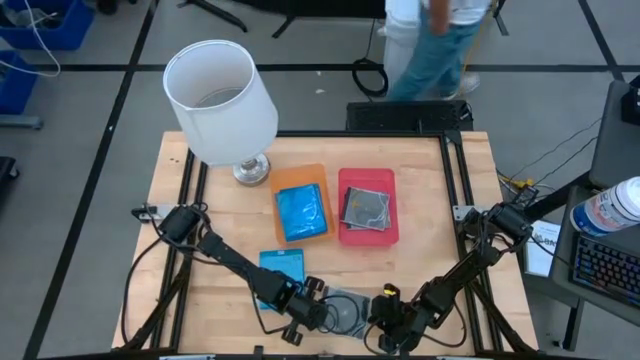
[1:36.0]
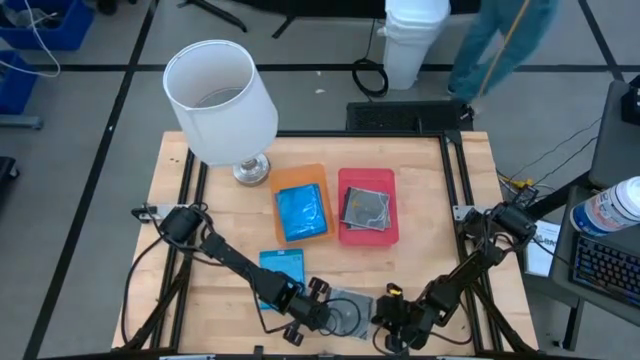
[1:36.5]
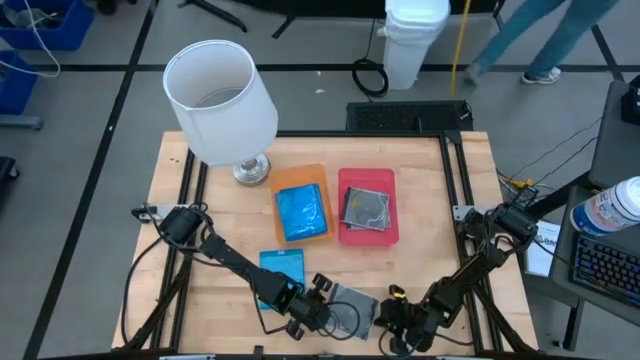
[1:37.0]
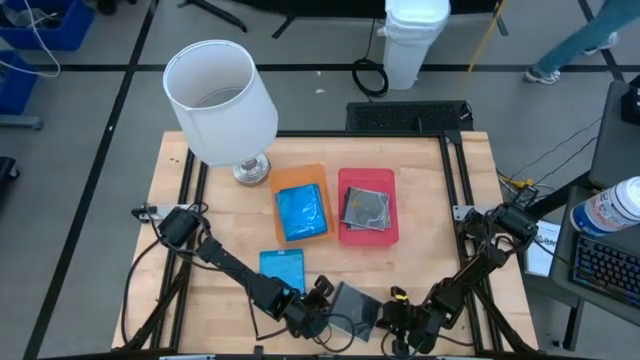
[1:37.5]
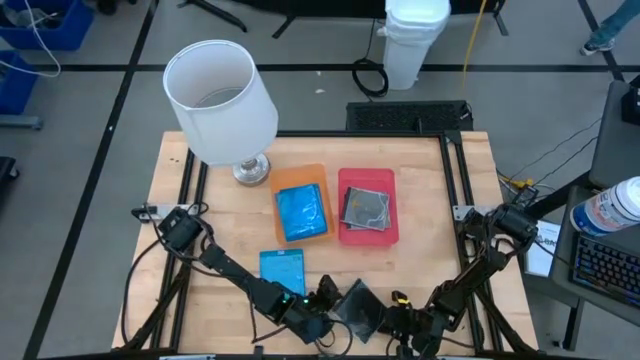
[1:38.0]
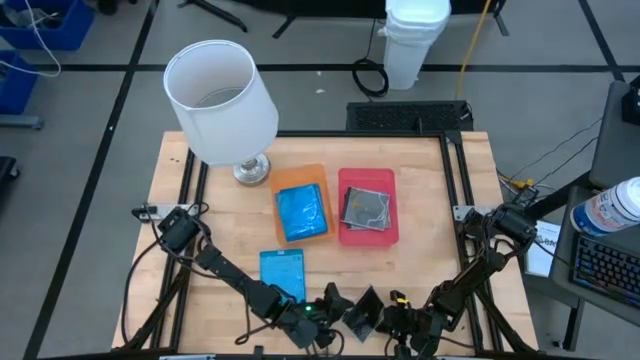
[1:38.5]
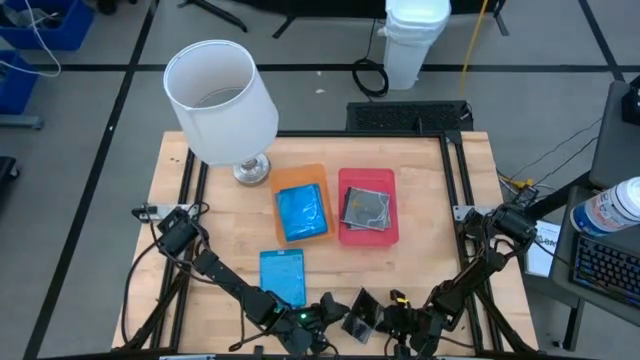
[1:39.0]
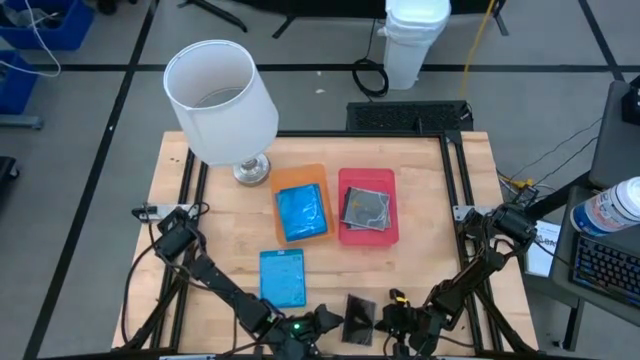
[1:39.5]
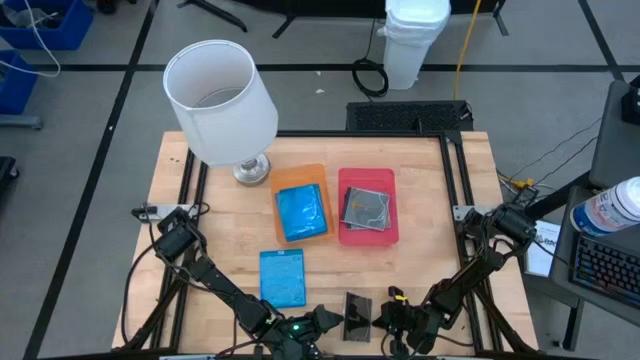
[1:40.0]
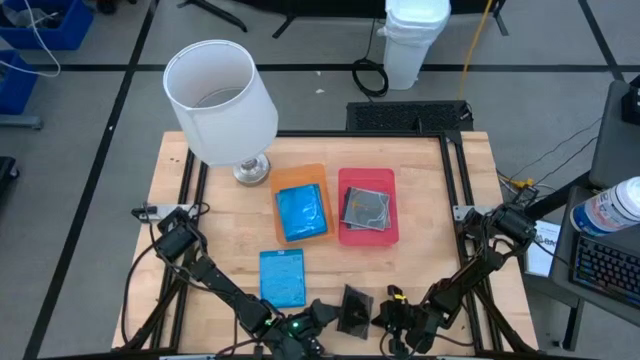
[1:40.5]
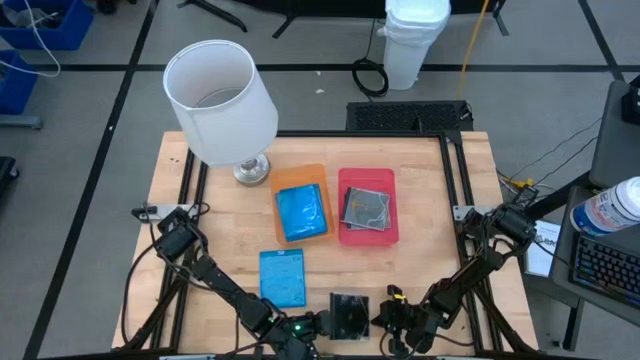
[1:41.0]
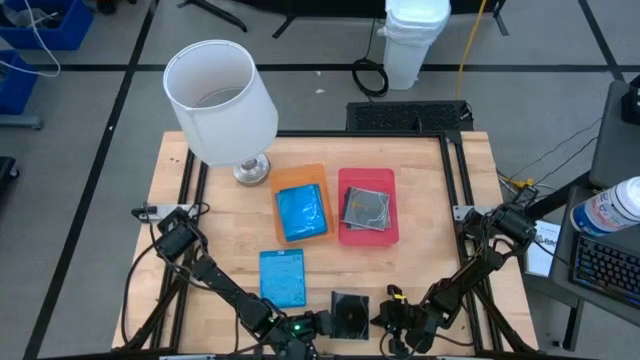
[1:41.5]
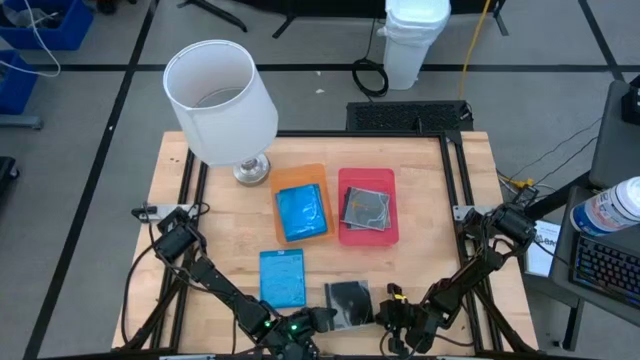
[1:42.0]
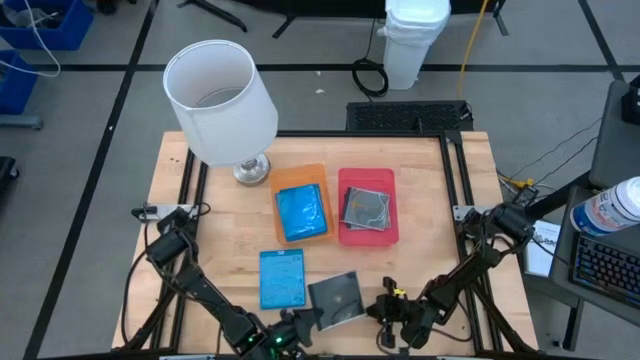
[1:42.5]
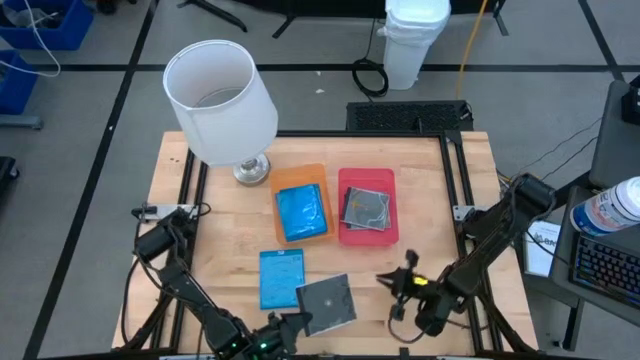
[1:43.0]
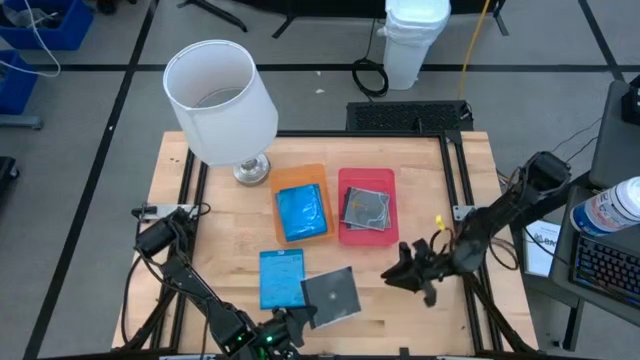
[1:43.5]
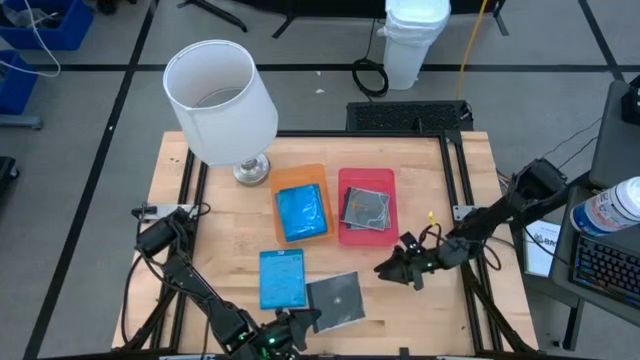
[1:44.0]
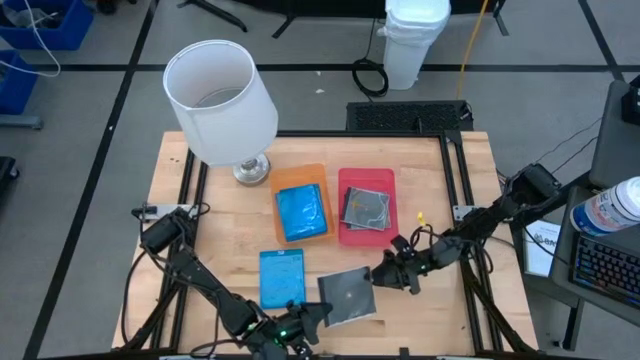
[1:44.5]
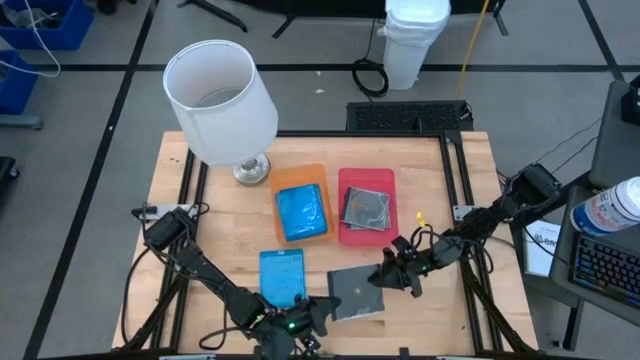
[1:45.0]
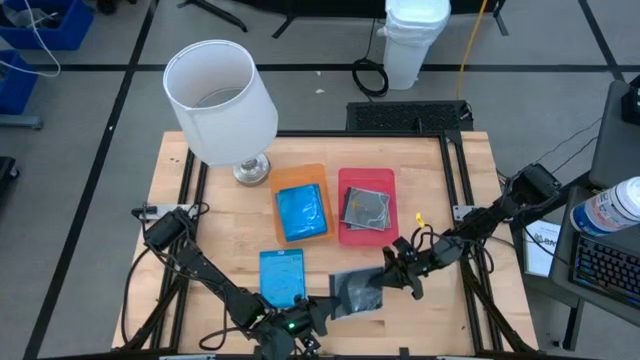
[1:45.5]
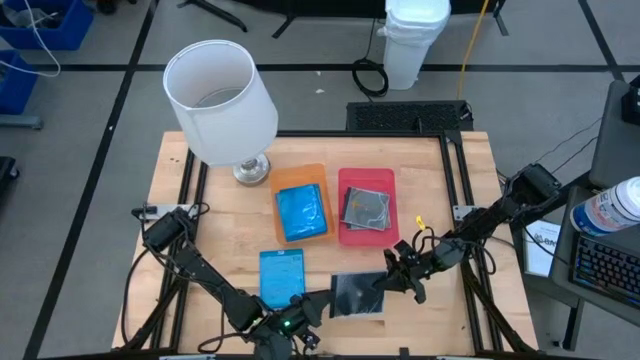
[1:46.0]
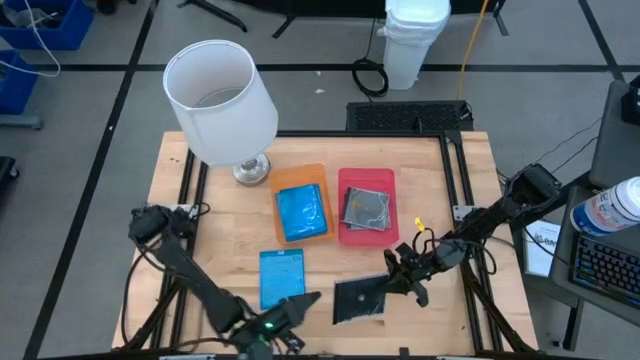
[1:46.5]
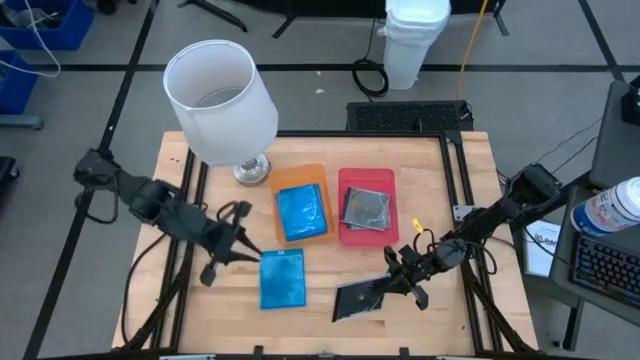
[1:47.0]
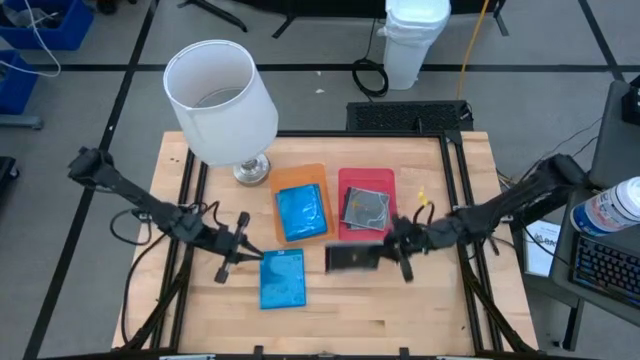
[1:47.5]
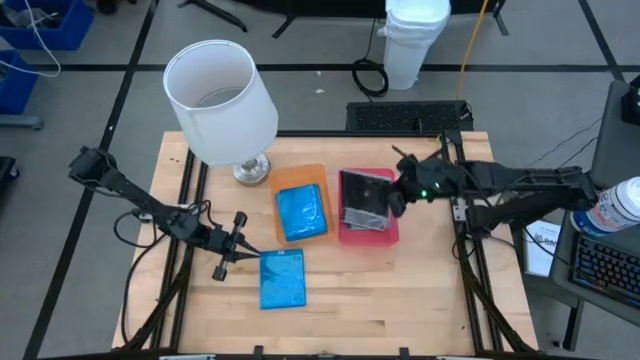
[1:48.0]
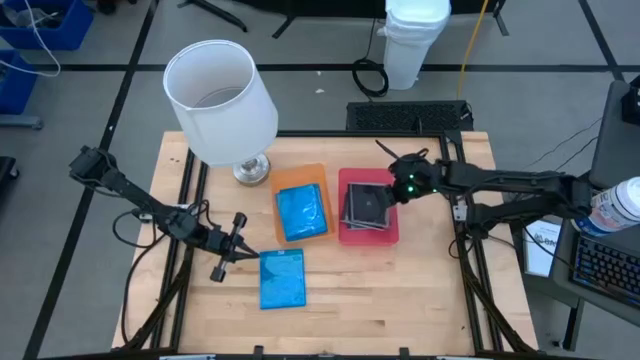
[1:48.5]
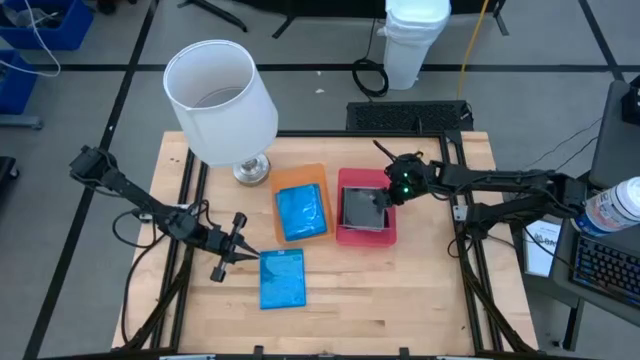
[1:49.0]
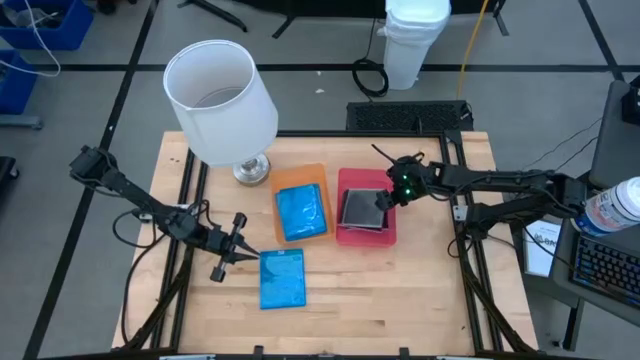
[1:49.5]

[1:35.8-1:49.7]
Task: Pick & place jewel cases by type
Put the black CD case into the pink bin

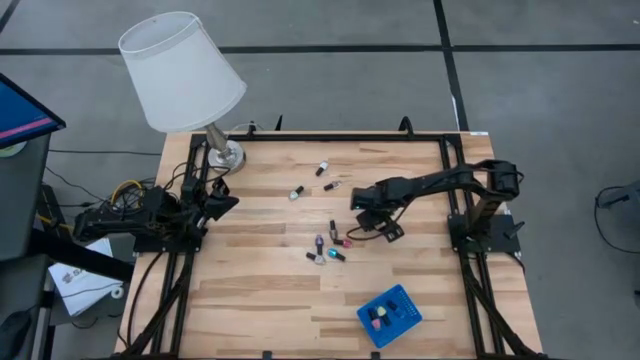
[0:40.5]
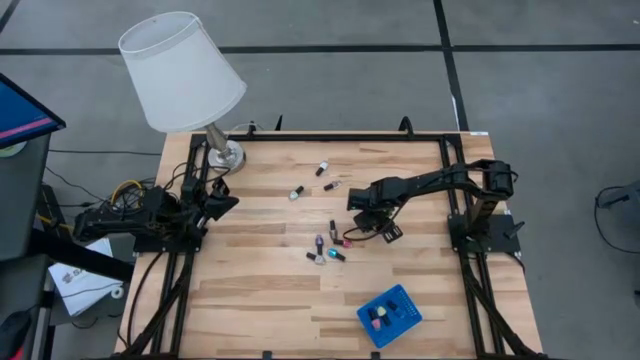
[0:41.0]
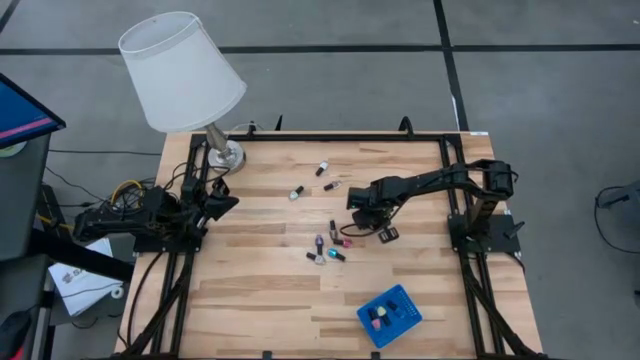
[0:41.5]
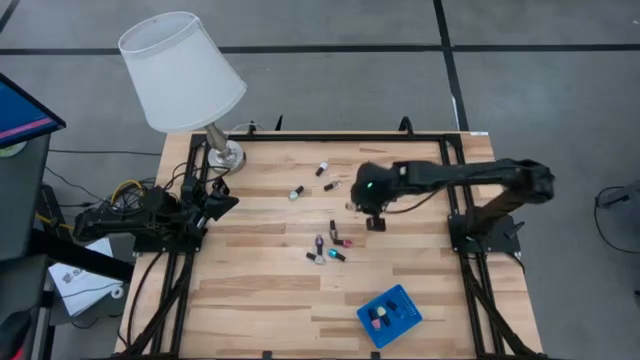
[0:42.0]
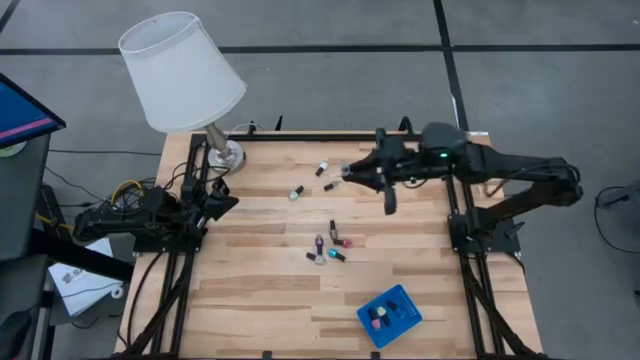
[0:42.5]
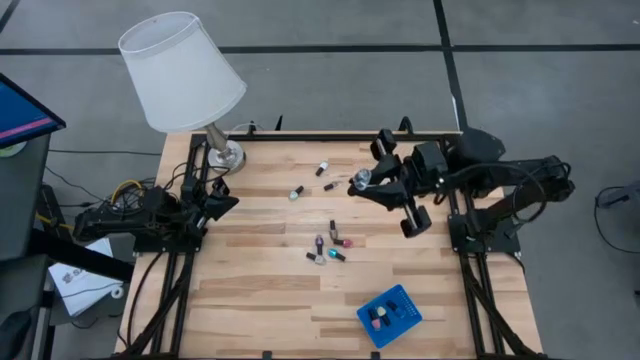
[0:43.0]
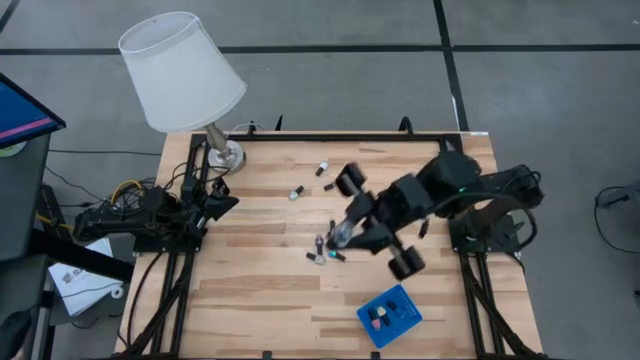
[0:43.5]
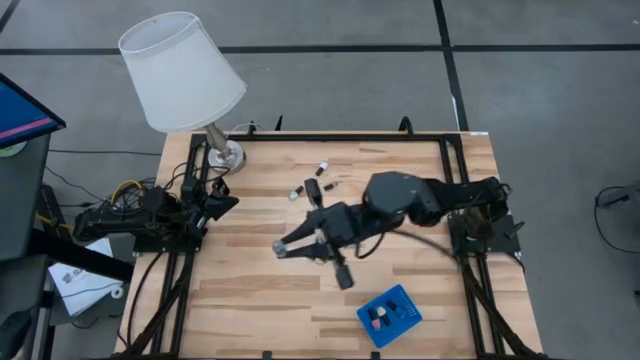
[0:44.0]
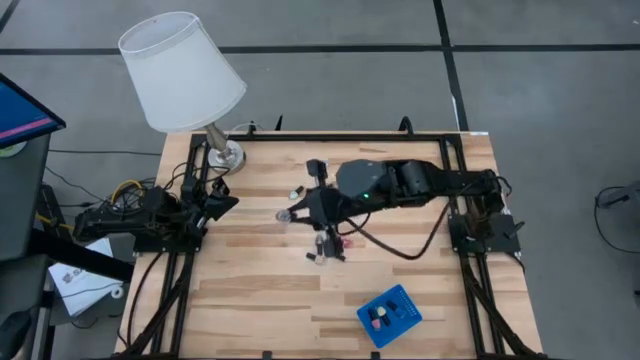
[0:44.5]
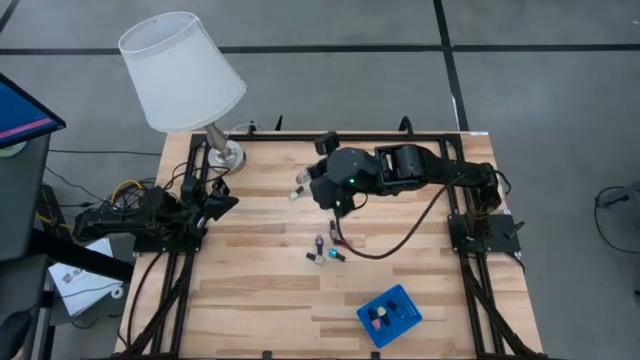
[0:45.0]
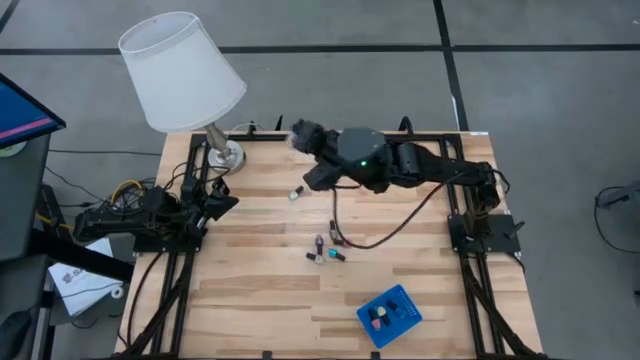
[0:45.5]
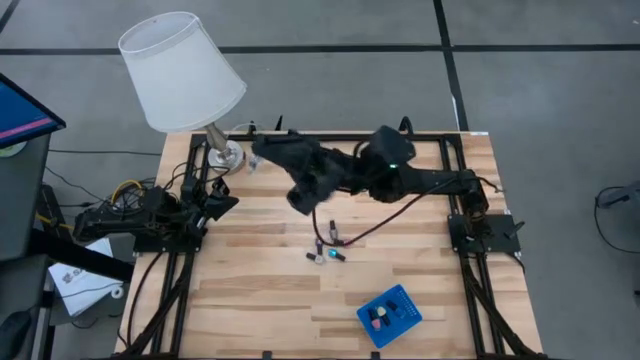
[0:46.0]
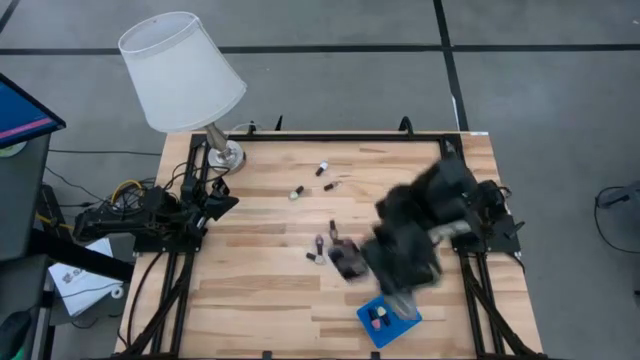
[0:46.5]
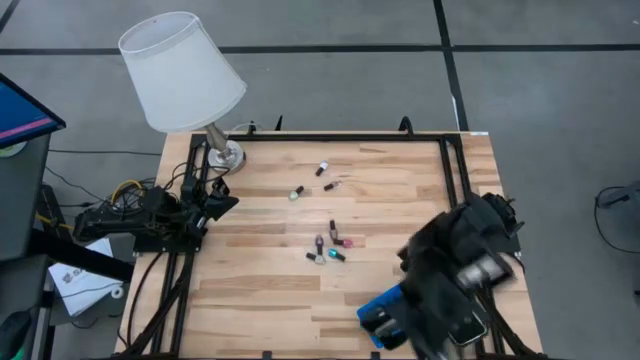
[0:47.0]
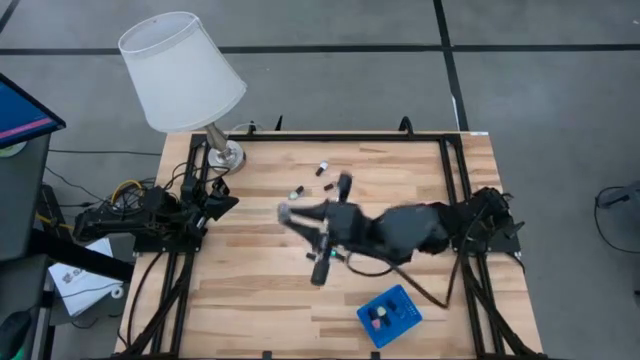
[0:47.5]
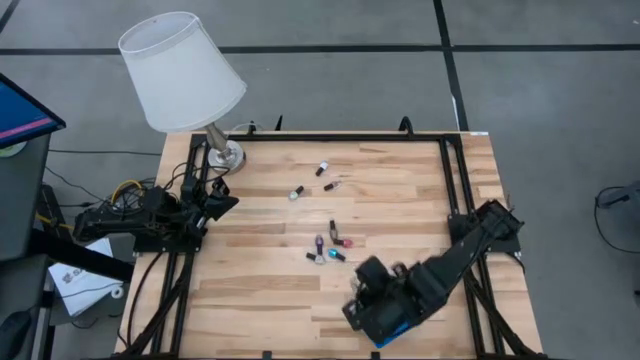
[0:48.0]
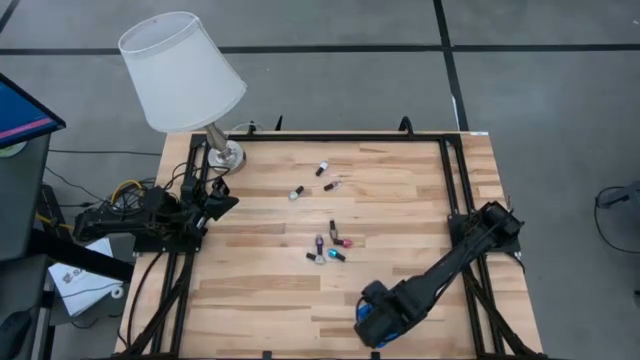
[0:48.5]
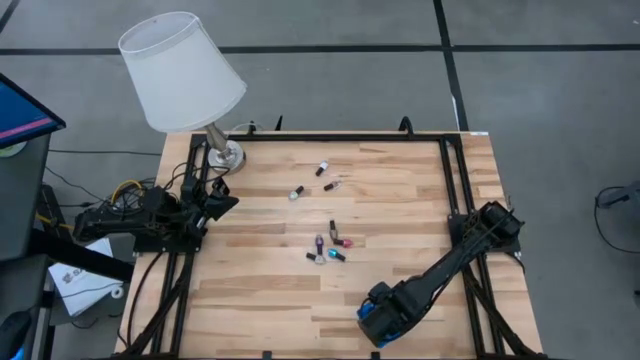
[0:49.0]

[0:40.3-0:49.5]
Task: Pick & Place Nail Polish
Put the bottom transparent nail polish into the blue bin
